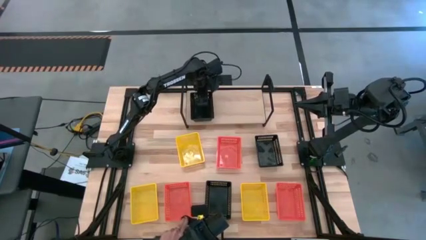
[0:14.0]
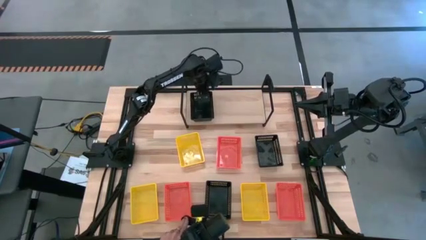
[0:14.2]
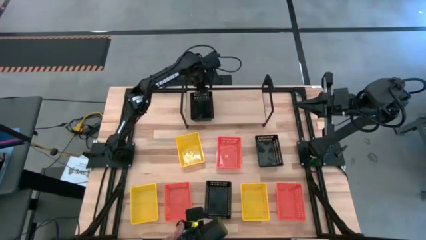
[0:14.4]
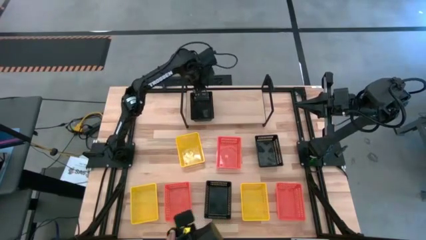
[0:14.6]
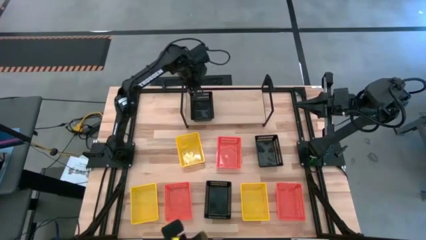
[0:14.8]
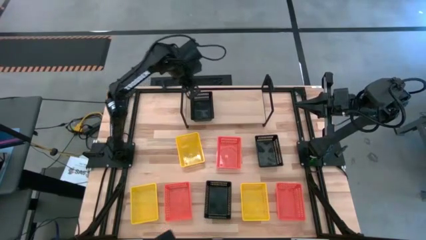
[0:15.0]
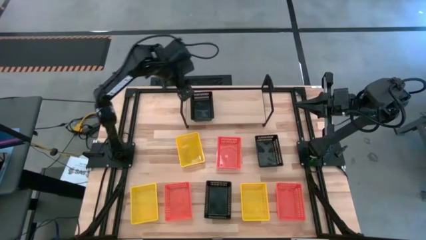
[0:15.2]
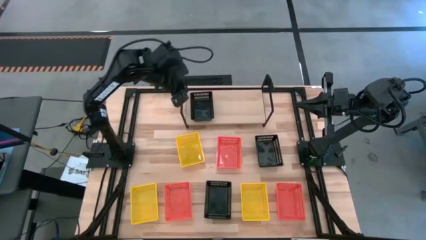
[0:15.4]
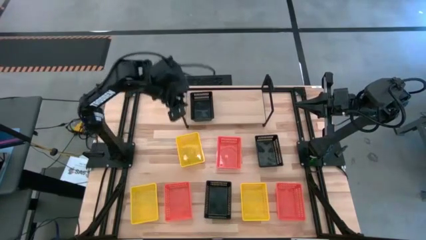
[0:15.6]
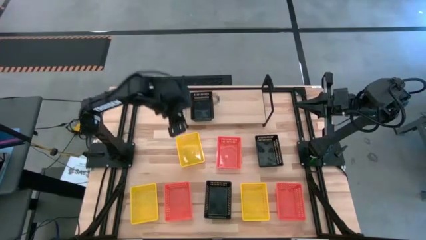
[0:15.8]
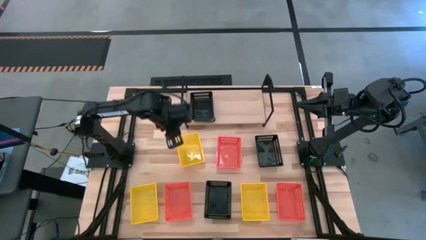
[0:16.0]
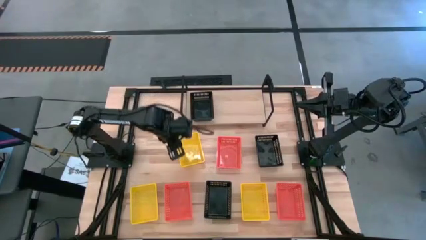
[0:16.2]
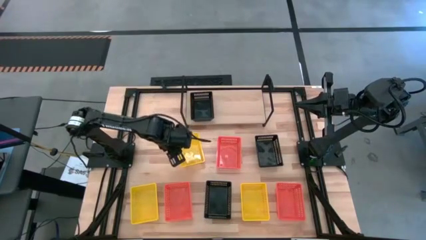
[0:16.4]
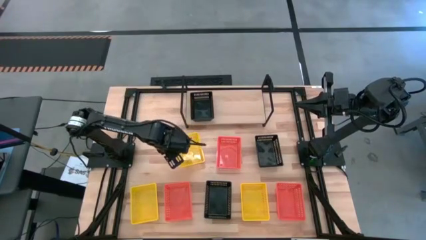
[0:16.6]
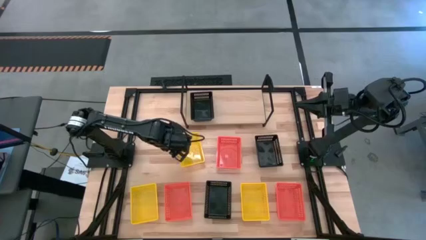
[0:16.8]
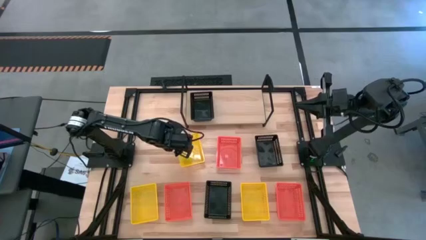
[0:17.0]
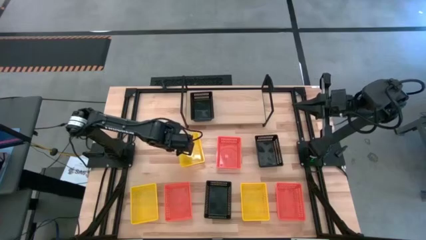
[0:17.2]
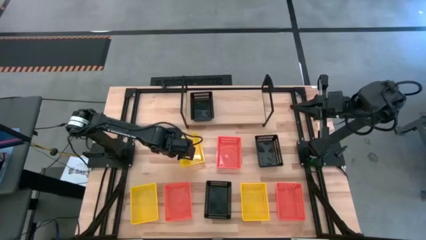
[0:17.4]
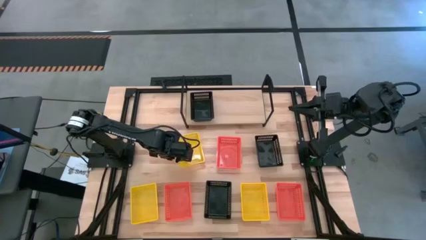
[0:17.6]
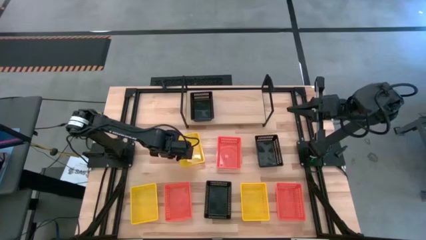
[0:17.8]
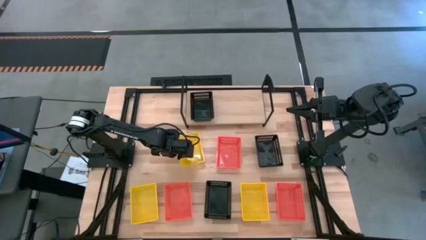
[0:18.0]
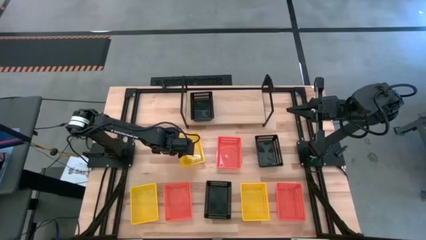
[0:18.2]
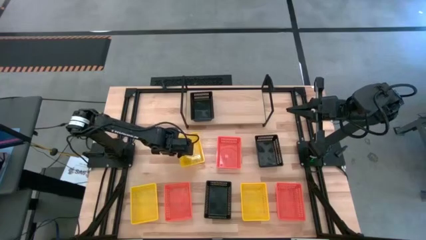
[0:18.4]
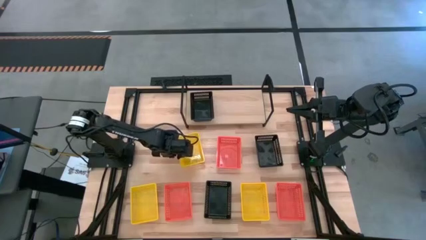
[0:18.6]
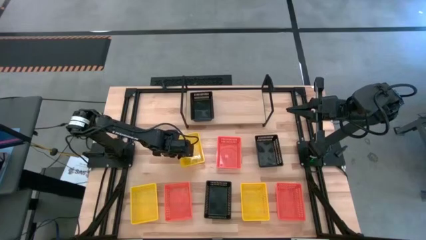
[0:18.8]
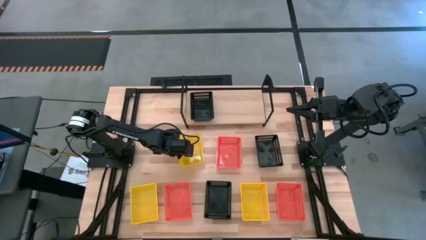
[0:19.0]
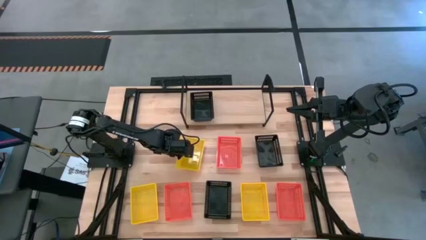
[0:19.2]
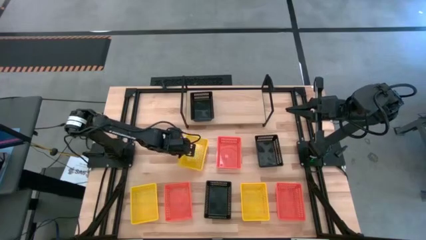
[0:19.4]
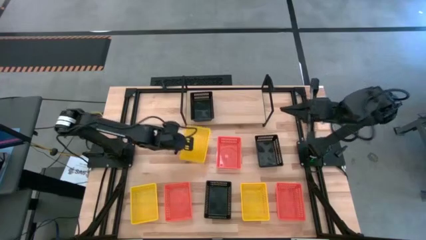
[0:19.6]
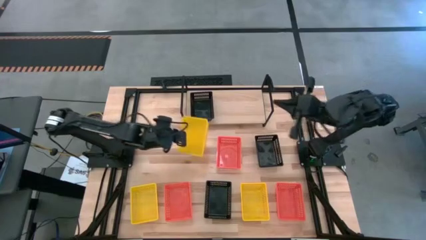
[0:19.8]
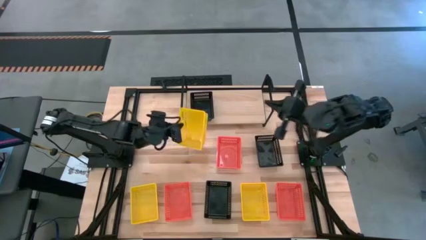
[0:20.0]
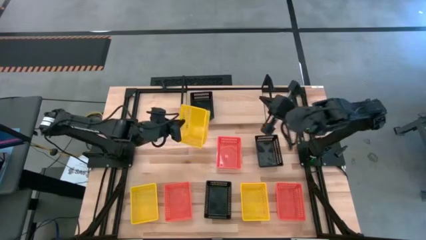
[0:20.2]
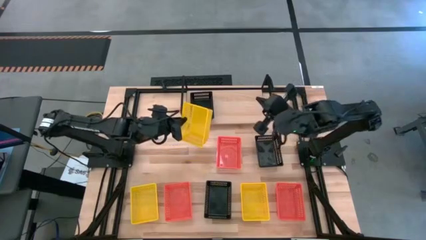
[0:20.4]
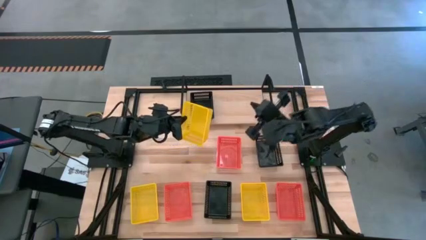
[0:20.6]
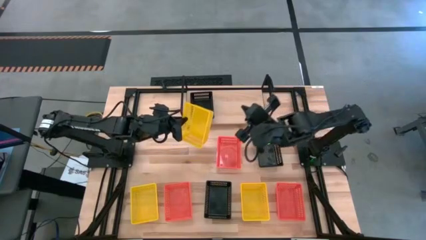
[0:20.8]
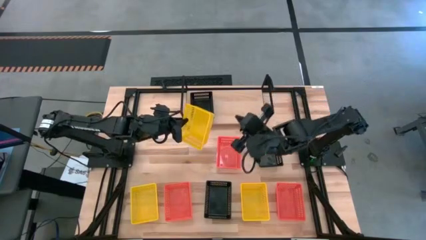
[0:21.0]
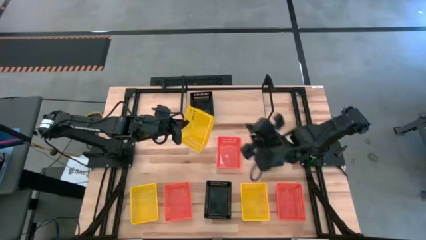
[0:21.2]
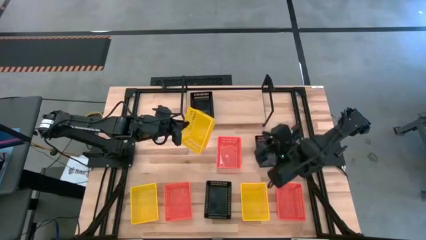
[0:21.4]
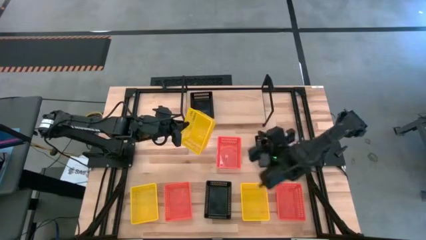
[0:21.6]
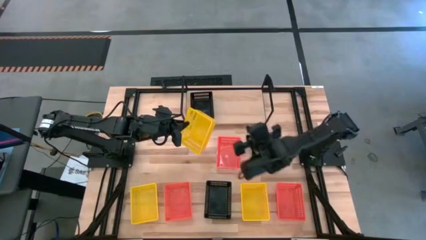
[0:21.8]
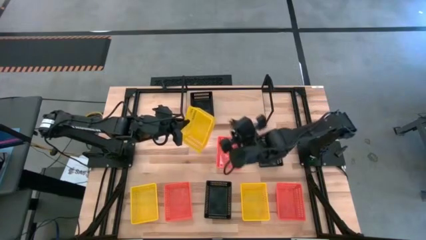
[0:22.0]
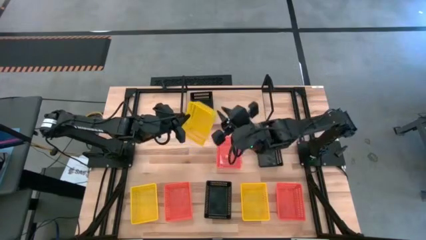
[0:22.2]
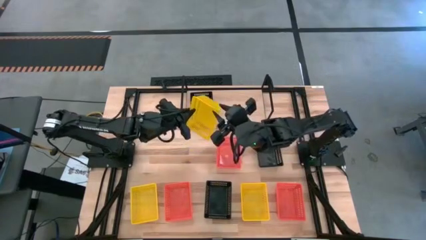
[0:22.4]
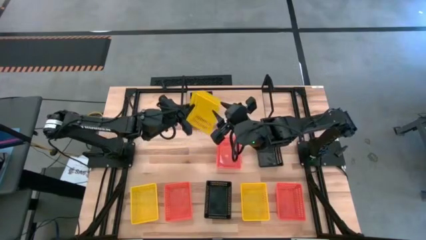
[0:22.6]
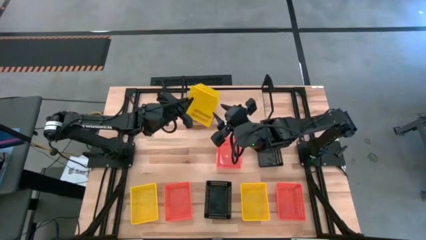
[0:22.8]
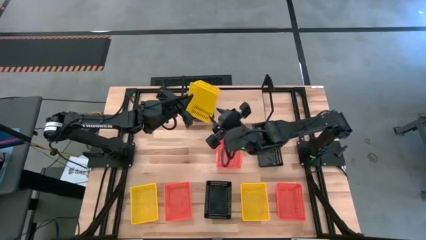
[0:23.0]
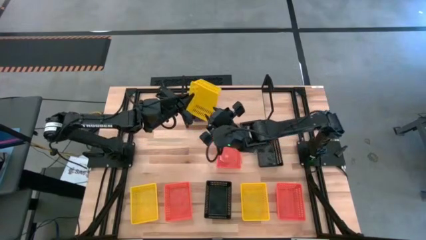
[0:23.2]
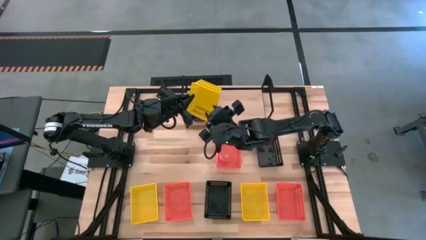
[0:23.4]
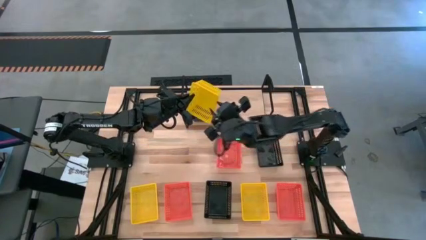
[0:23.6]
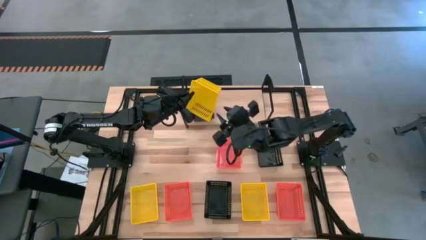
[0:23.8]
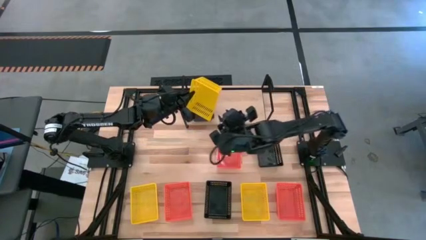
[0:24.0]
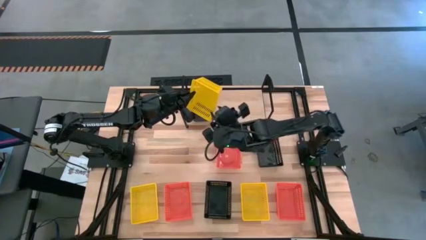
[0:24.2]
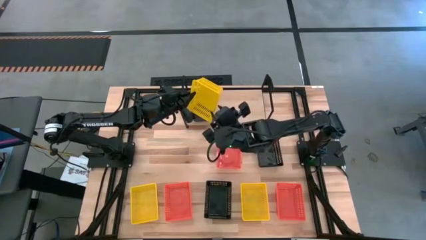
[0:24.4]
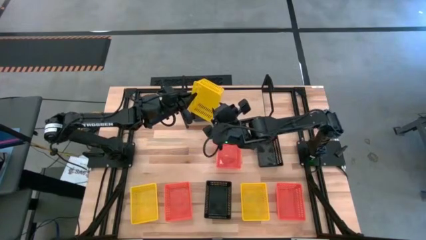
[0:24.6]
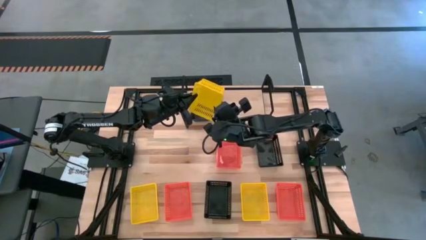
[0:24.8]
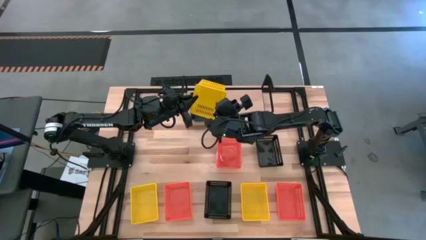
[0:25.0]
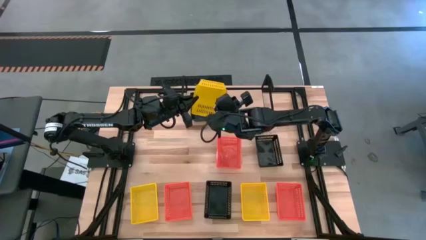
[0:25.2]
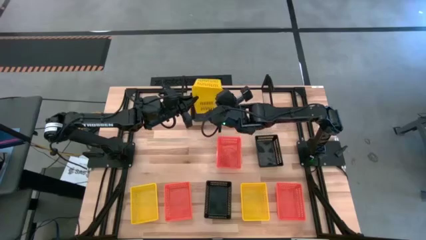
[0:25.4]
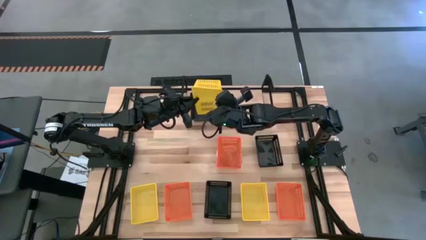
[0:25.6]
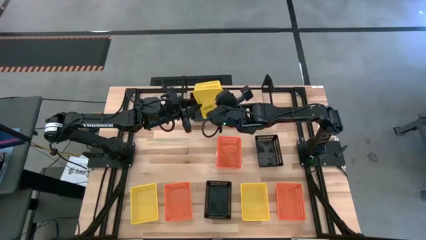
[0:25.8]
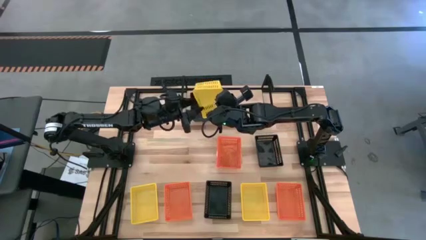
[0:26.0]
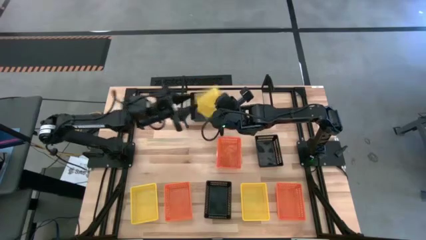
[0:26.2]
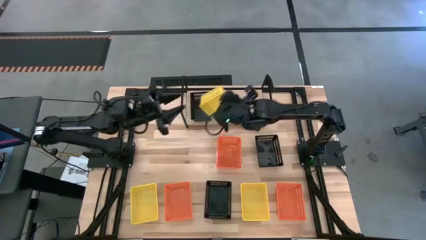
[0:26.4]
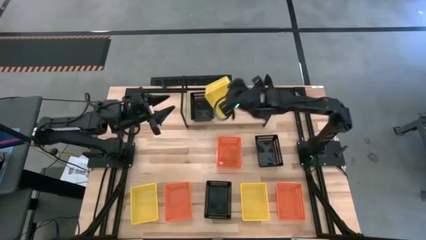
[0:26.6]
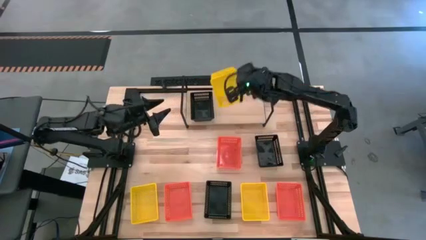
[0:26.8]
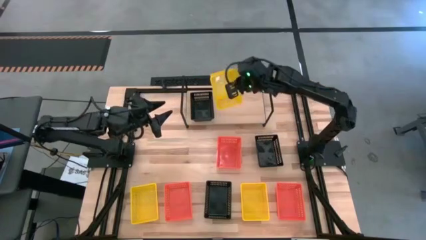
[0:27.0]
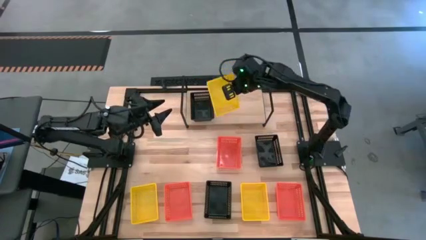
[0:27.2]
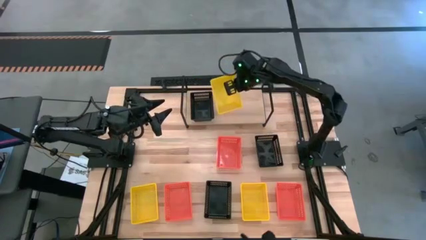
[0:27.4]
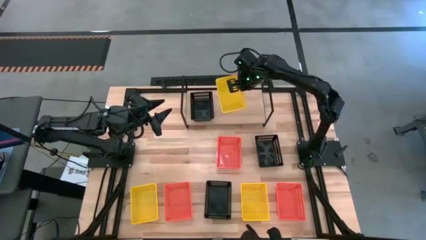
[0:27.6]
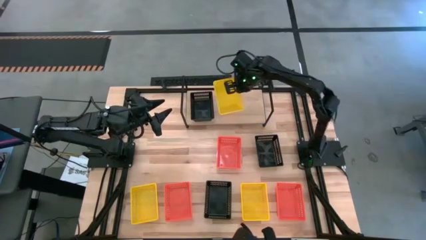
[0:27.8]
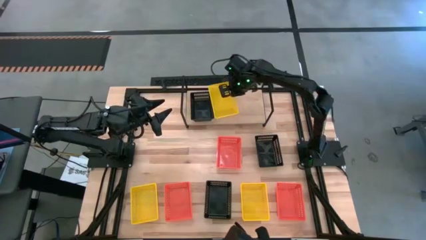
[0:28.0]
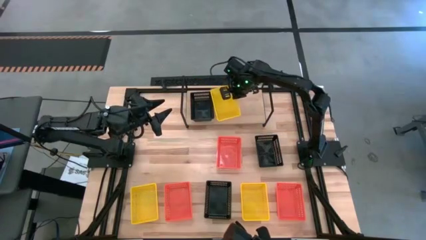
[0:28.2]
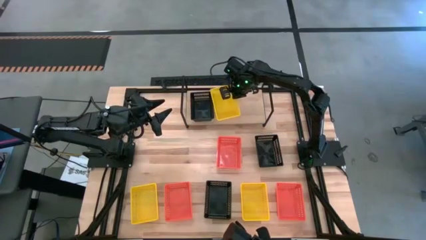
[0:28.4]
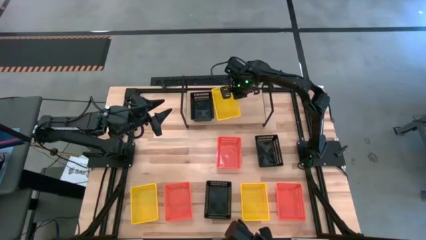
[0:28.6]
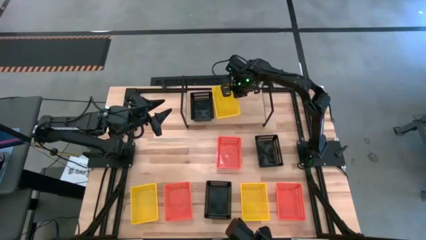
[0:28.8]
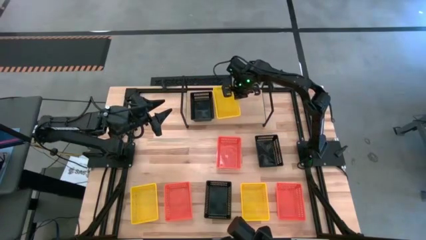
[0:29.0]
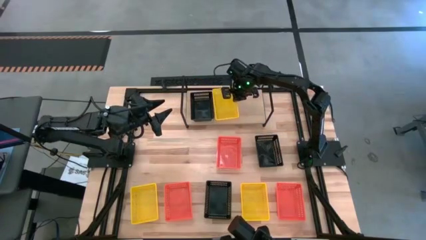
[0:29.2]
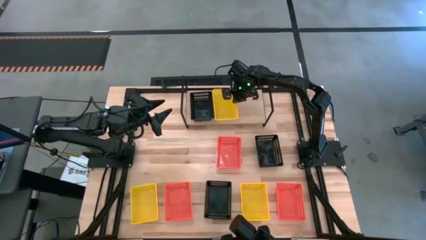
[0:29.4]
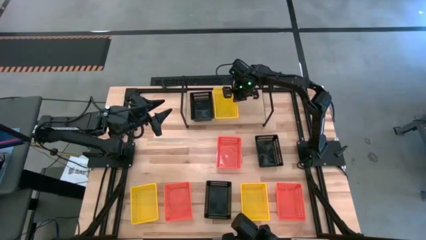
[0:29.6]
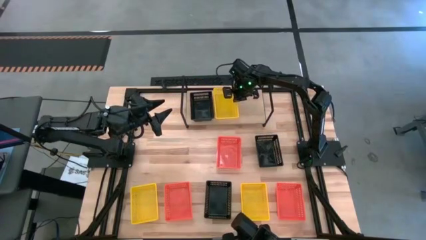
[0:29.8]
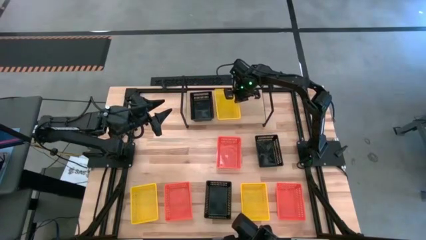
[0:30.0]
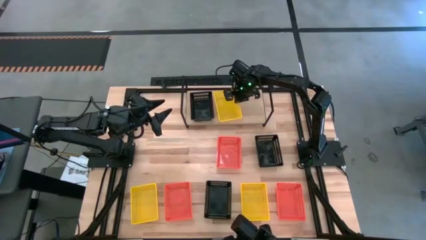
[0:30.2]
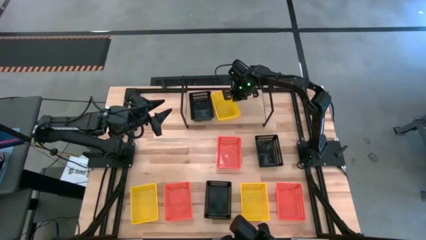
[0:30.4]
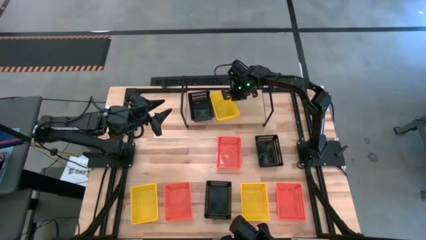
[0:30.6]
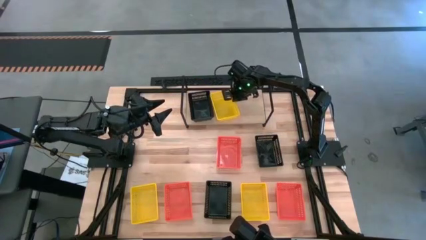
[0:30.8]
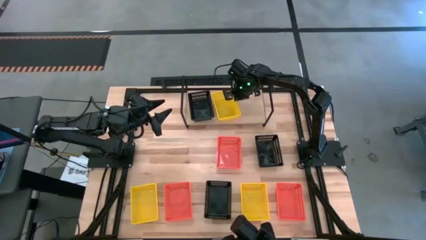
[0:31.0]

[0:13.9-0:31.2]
Task: Stack baskets on shelf by color
Put the top yellow bin on the shelf

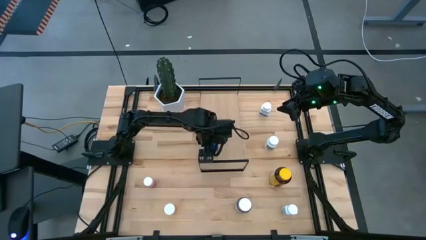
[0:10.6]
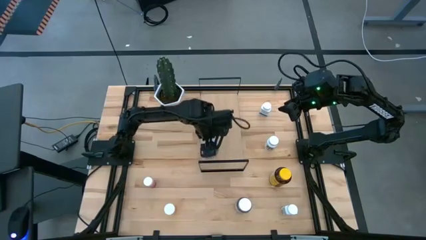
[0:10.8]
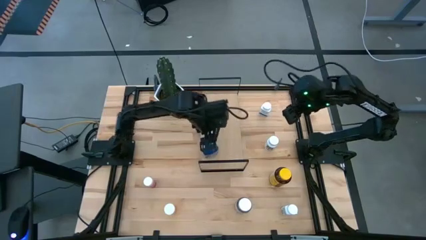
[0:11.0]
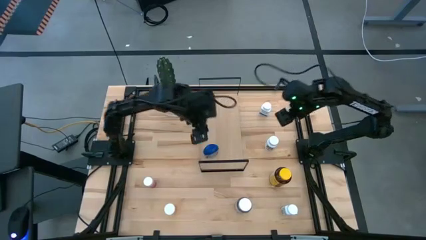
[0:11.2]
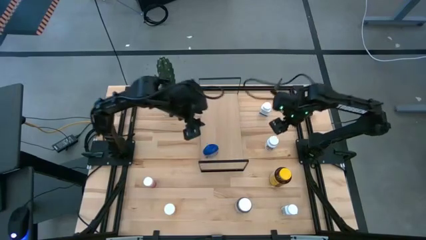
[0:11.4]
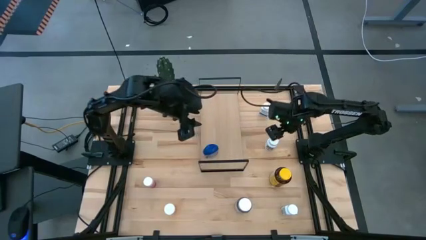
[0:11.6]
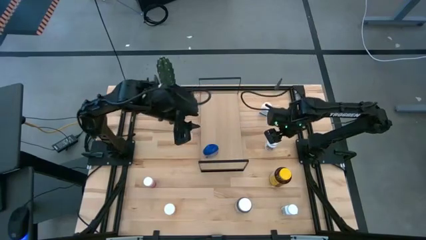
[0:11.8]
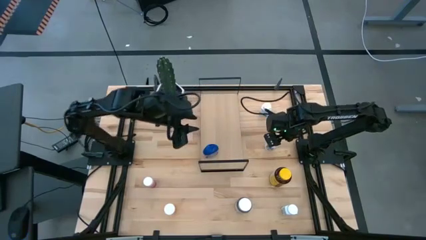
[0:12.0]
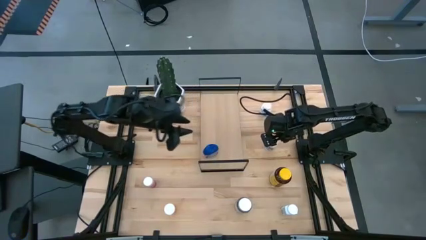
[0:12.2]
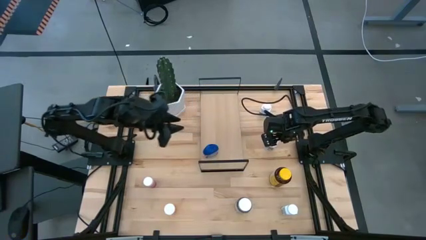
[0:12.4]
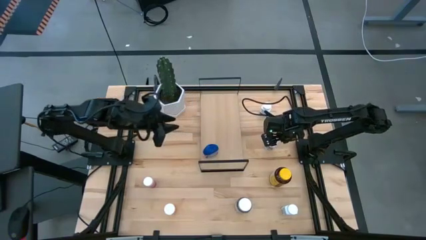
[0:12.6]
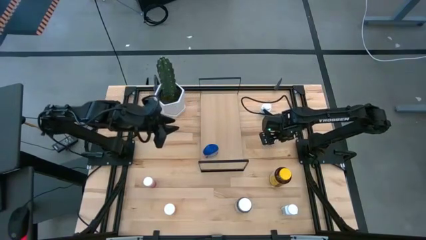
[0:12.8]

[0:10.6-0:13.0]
Task: Pick and place medicine bottles onto shelf by color
Put the white medicine bottle on the shelf
